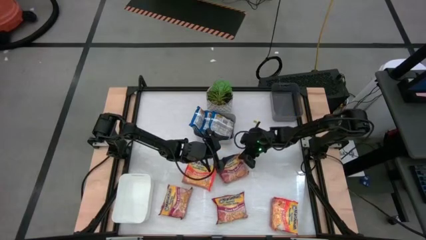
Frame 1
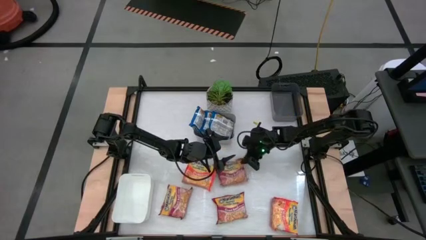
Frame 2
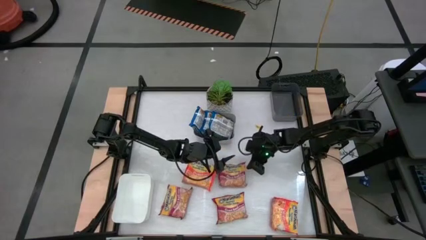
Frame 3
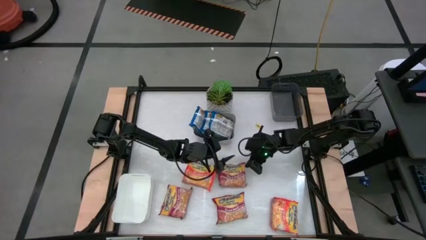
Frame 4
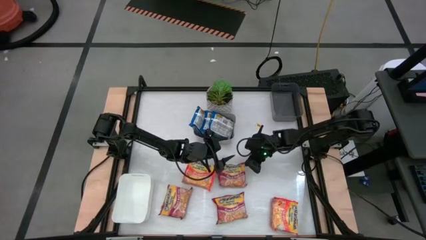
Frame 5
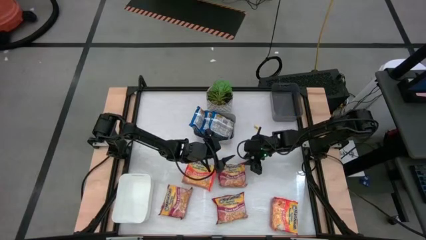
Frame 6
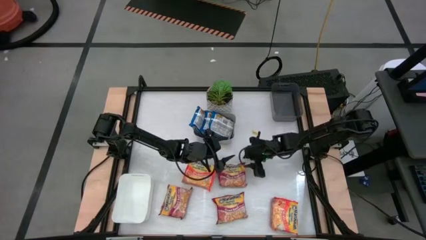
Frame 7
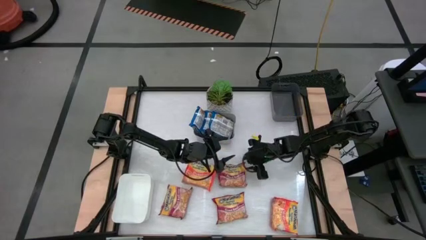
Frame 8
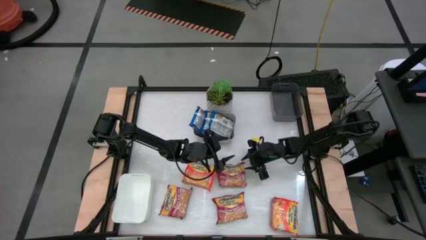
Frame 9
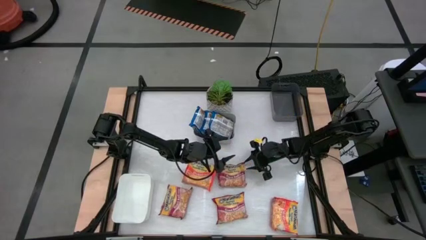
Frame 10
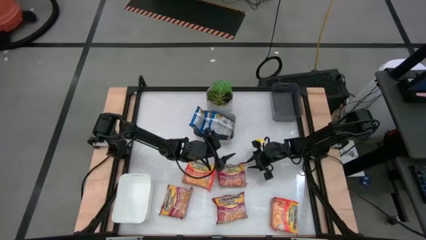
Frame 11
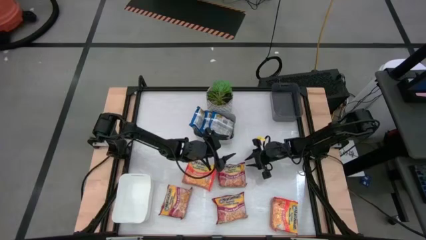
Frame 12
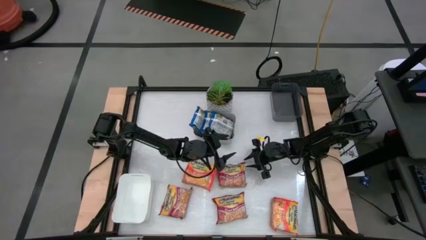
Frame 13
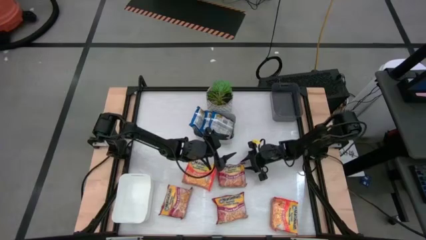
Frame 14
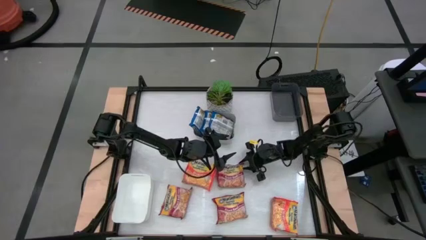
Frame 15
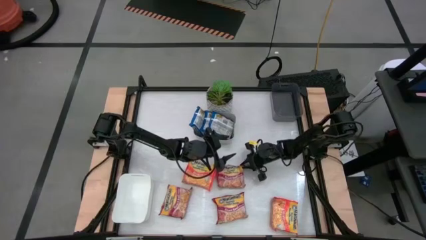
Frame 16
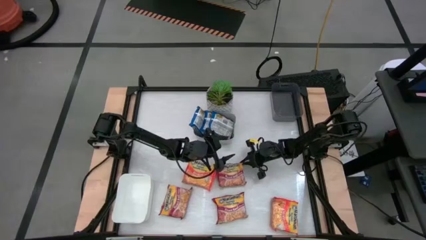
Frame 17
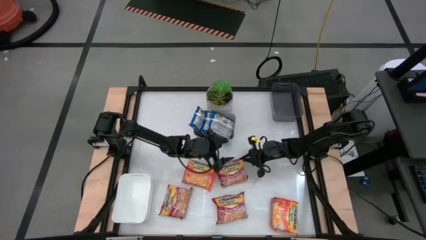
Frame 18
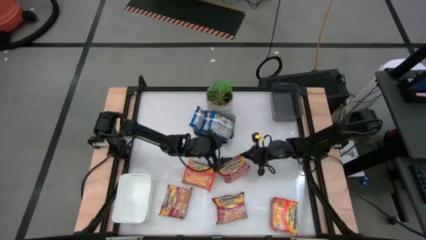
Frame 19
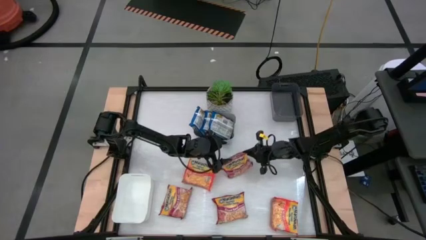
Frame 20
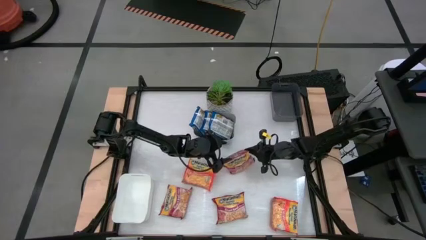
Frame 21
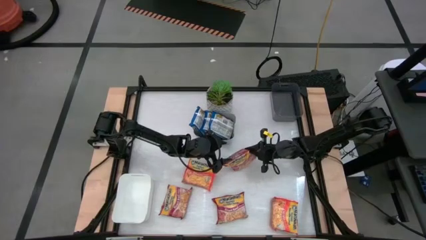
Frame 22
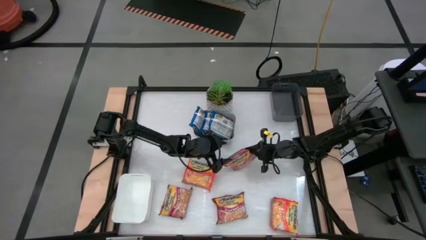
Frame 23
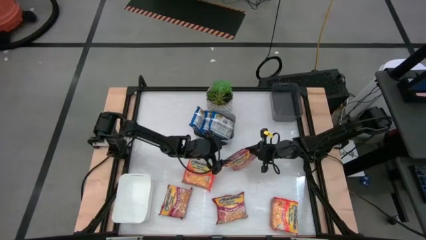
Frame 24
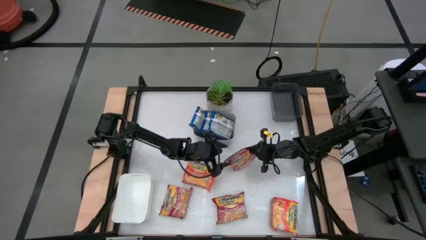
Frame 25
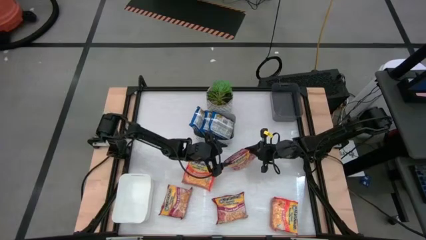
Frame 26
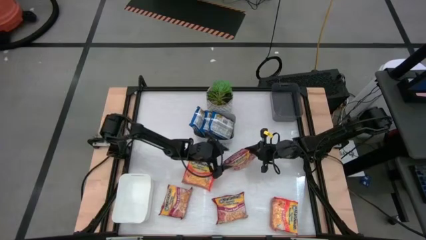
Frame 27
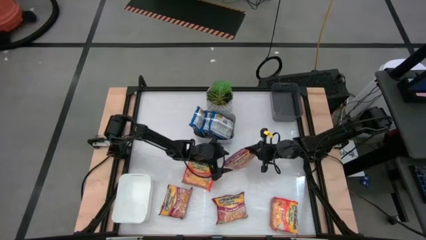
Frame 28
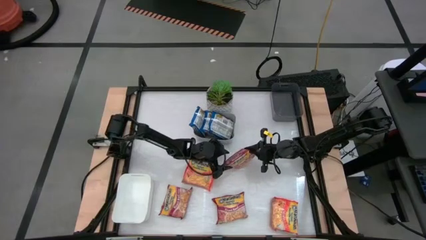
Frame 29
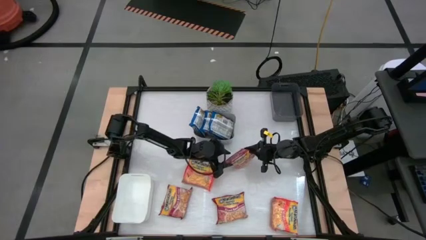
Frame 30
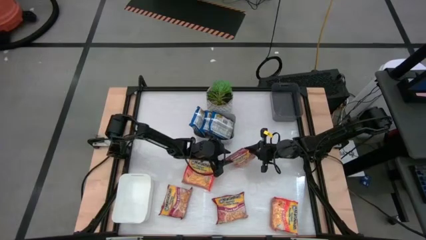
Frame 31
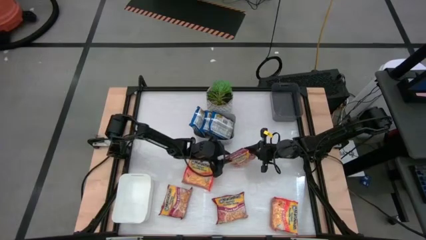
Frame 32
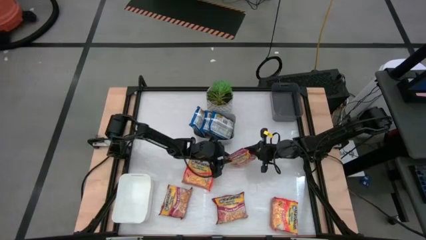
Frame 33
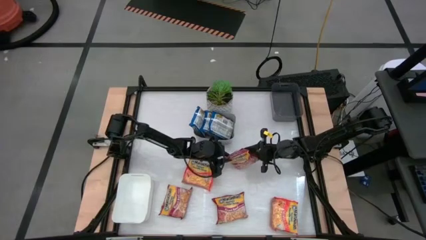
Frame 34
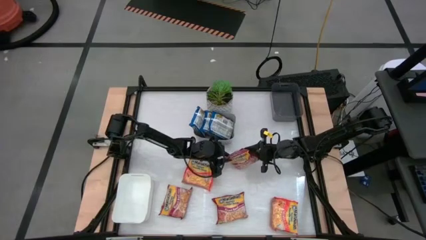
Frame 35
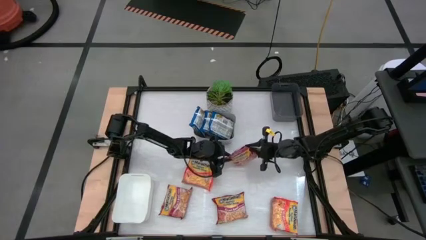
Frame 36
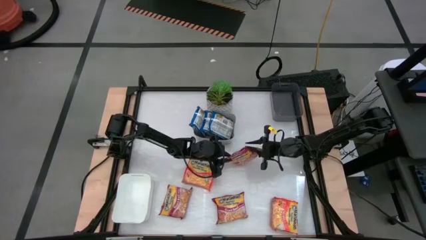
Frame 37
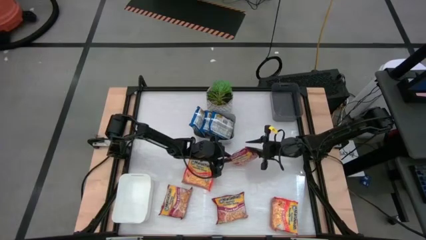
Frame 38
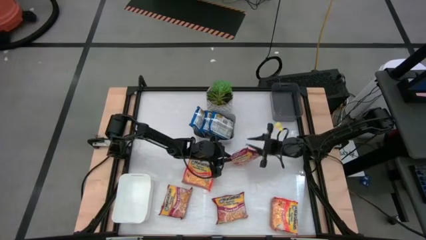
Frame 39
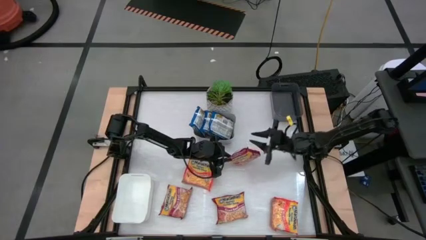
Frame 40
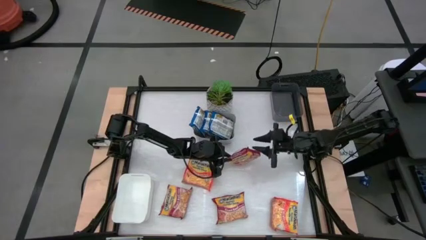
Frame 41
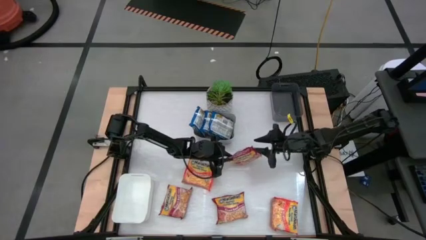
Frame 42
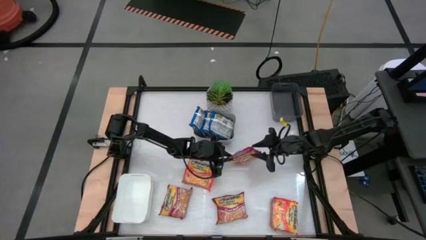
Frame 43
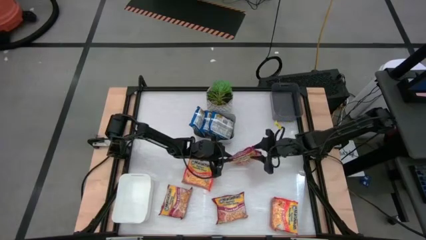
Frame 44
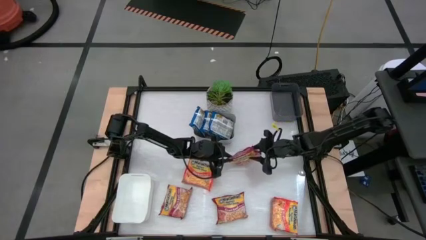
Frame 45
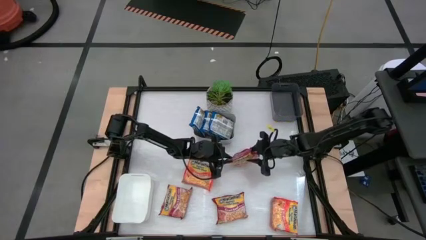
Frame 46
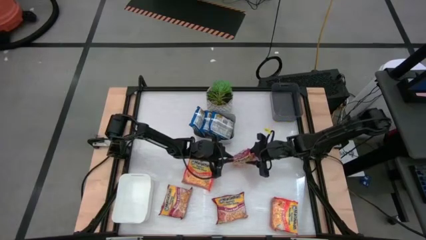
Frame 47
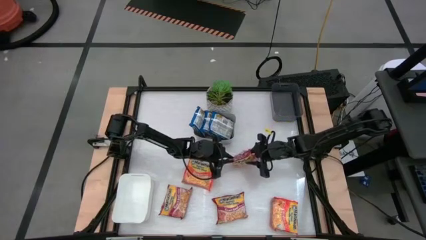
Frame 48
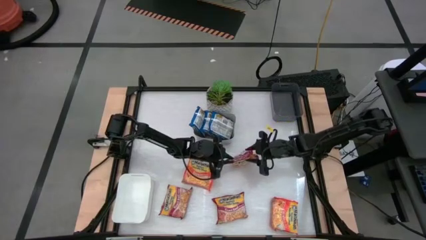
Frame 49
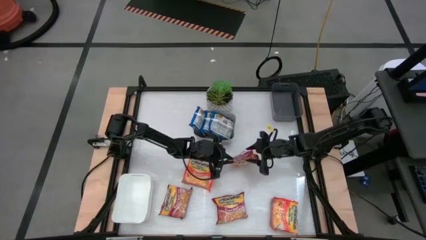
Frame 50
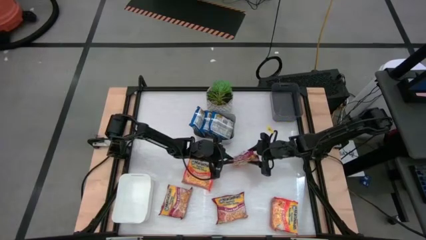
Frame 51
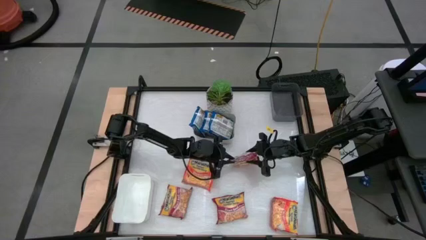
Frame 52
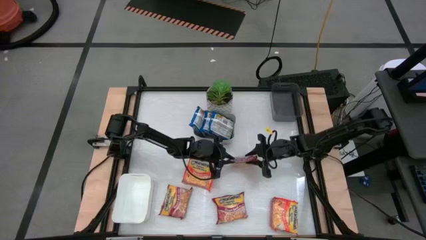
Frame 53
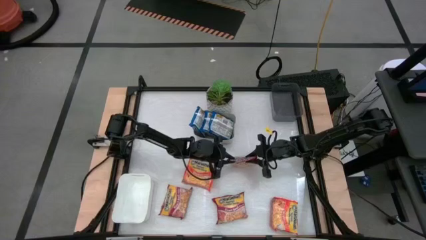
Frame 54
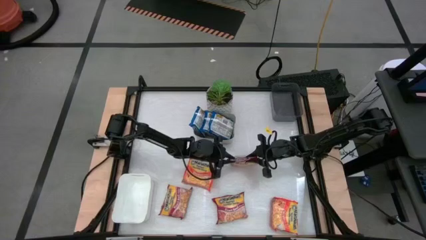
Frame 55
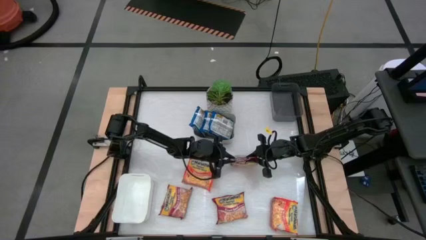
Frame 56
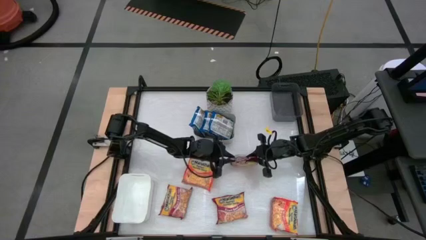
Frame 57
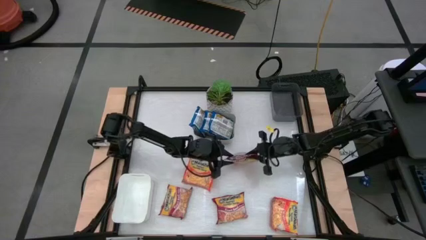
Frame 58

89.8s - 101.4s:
Task: Sort Maruchan noodles
Put the right red noodle pack into the black bin
